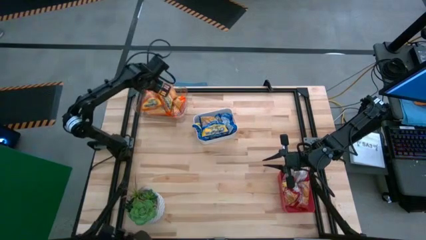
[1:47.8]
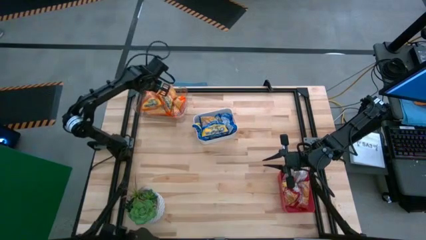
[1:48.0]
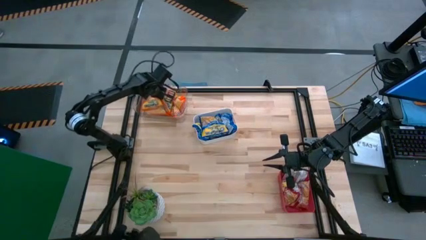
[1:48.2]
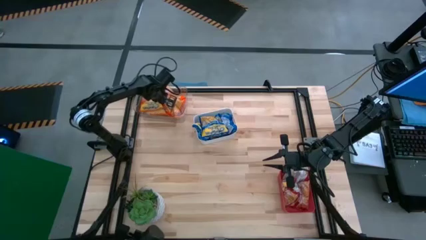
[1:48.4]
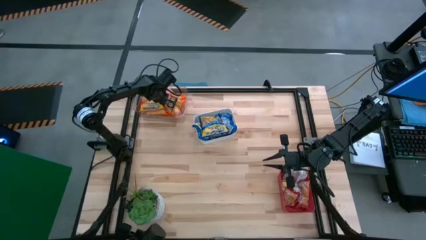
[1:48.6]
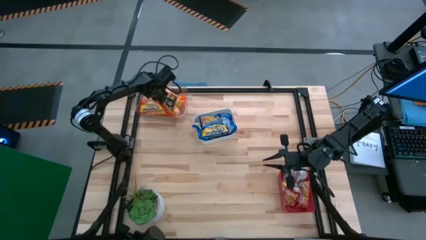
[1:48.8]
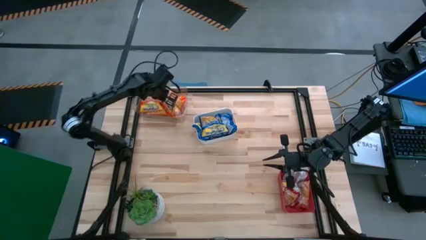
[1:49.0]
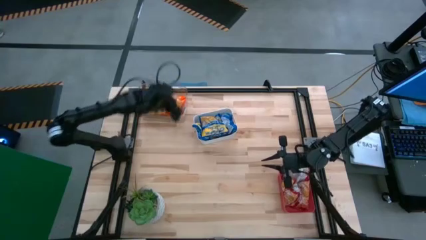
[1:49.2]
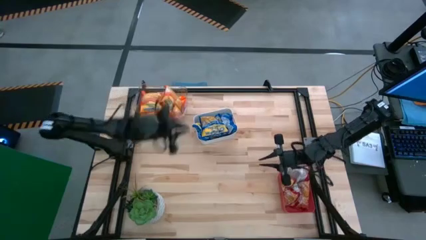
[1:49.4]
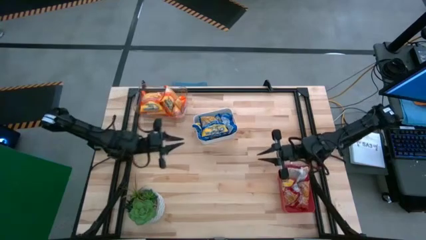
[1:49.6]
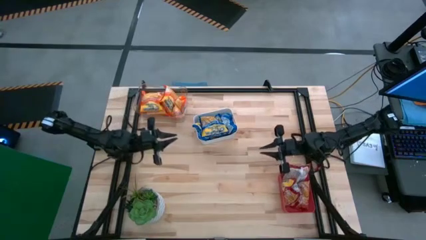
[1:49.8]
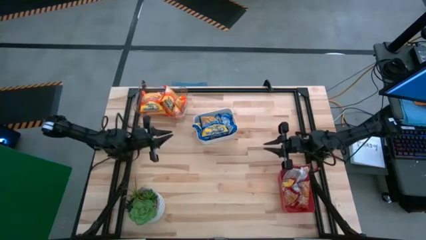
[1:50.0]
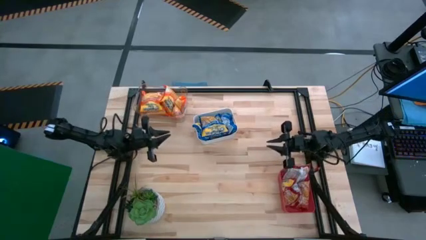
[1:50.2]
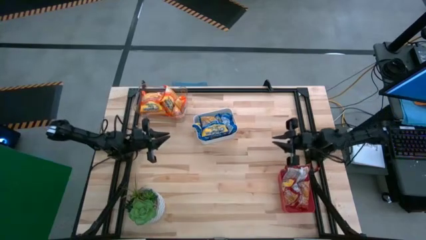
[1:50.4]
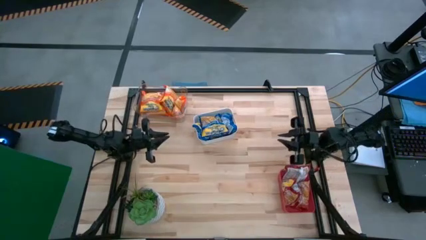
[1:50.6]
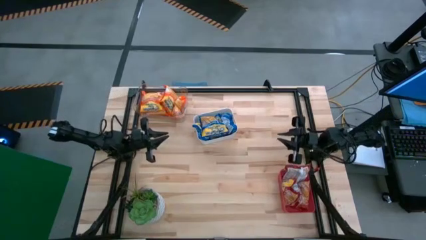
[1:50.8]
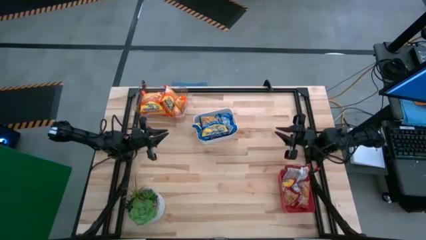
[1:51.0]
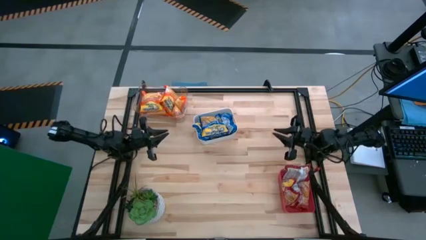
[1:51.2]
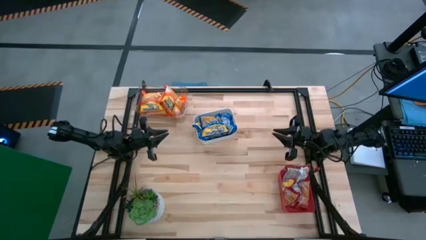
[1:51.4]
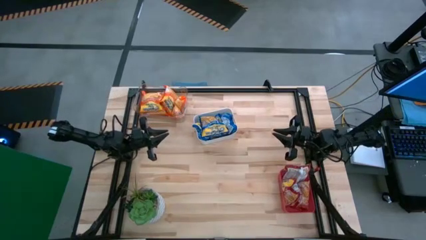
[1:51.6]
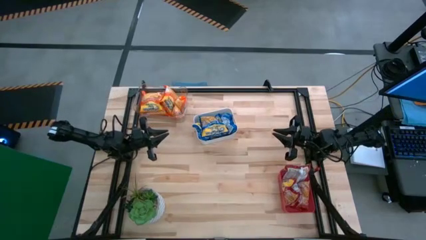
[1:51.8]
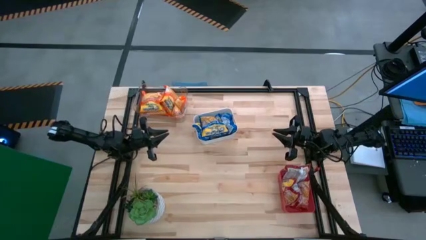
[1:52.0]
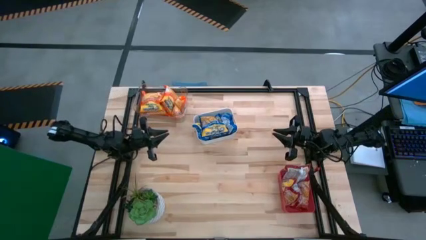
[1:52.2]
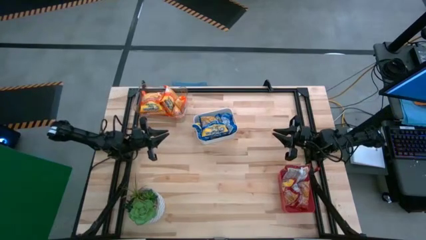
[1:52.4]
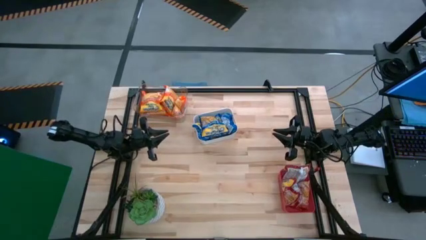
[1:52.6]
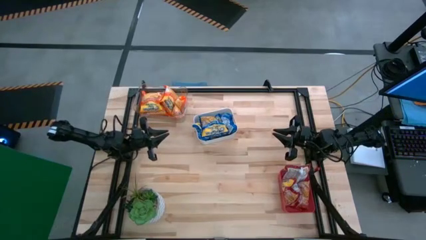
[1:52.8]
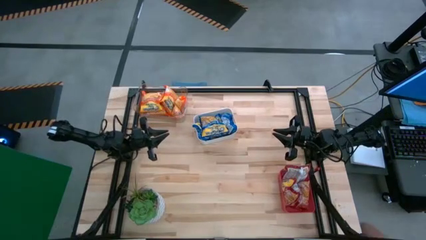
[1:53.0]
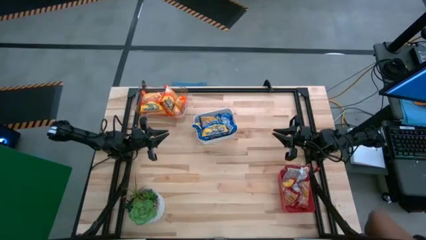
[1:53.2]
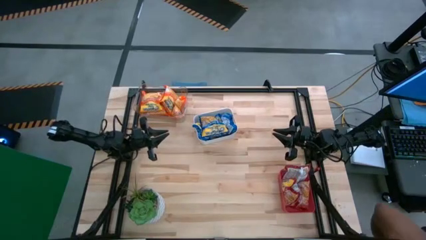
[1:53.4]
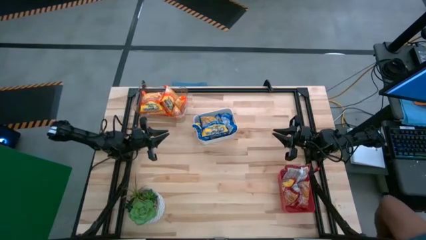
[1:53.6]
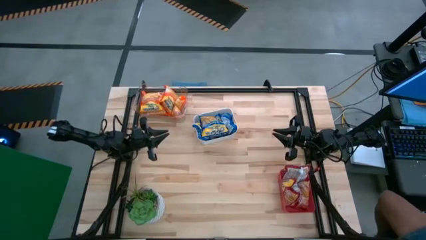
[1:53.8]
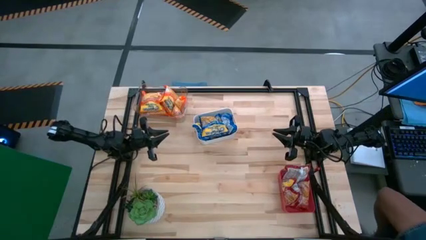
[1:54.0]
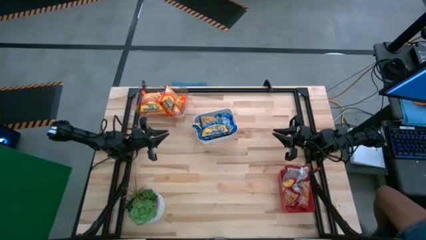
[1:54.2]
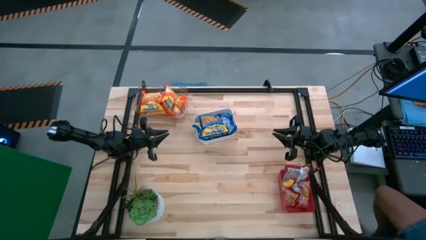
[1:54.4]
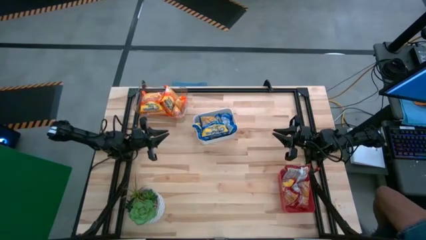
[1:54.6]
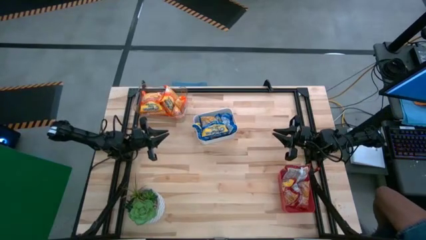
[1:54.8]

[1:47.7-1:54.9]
Task: Sort Maruchan noodles
Return to Home Position

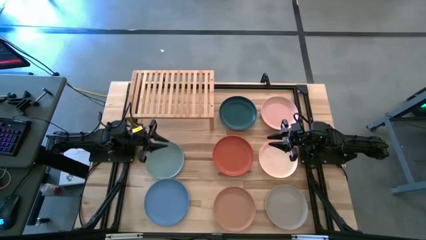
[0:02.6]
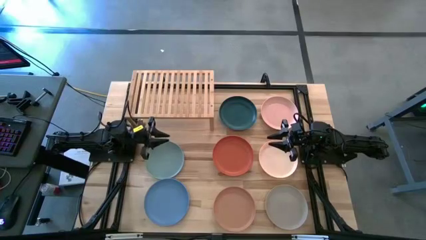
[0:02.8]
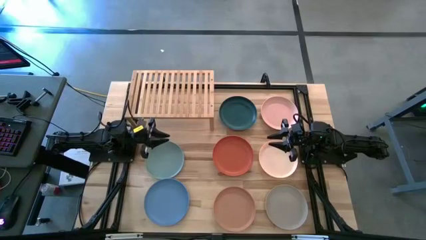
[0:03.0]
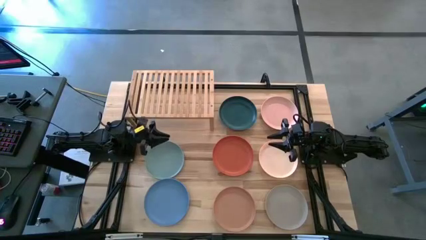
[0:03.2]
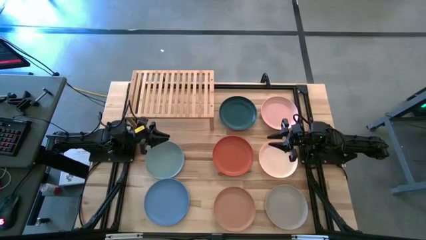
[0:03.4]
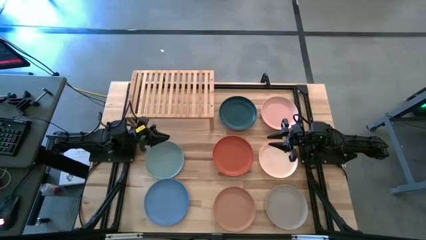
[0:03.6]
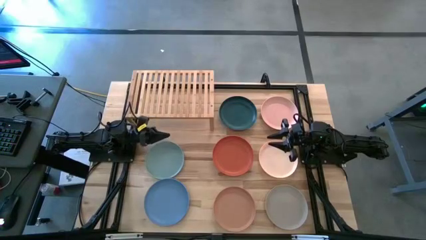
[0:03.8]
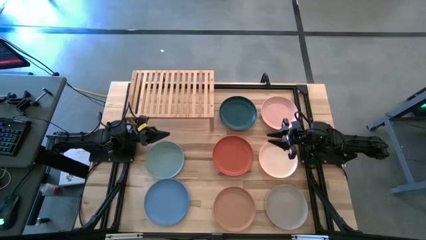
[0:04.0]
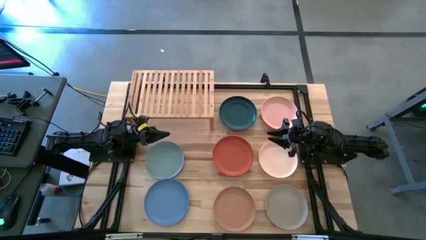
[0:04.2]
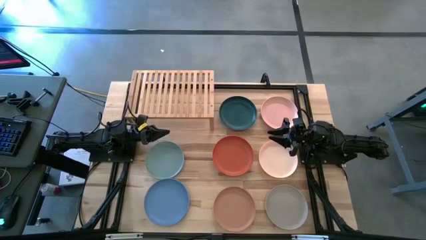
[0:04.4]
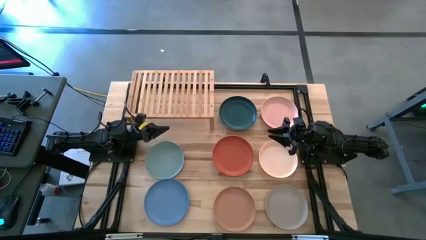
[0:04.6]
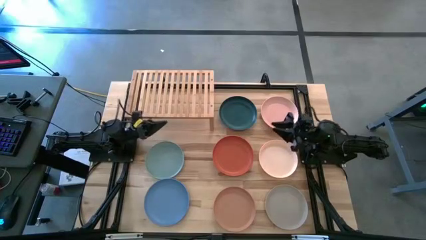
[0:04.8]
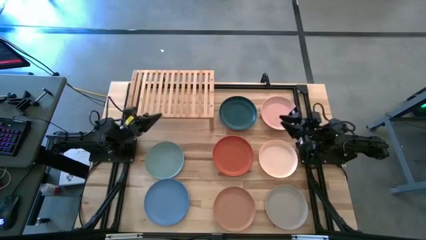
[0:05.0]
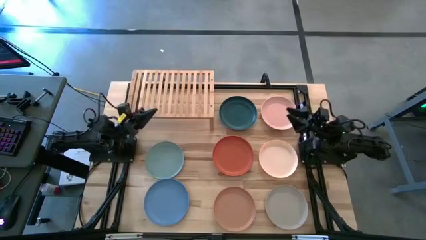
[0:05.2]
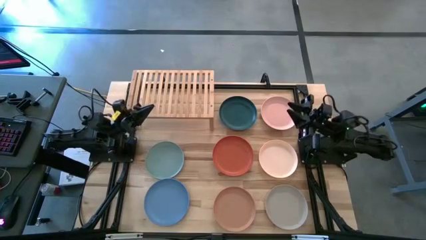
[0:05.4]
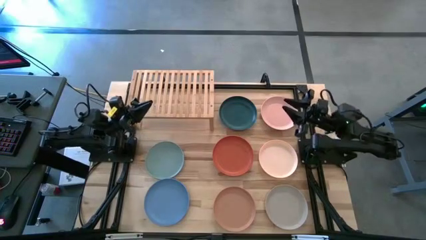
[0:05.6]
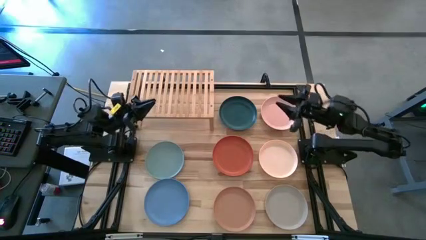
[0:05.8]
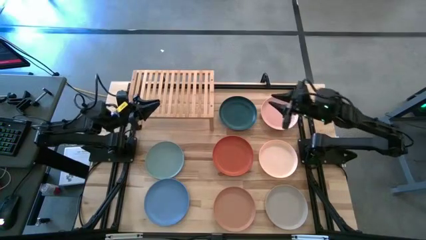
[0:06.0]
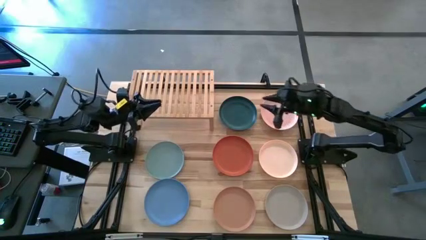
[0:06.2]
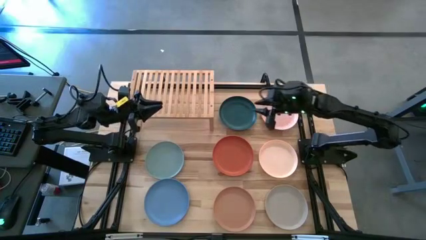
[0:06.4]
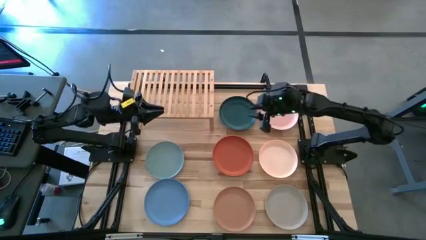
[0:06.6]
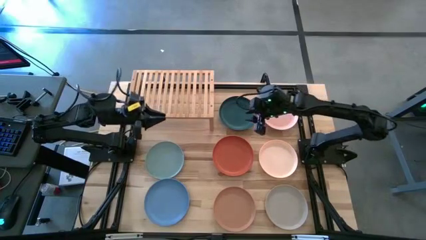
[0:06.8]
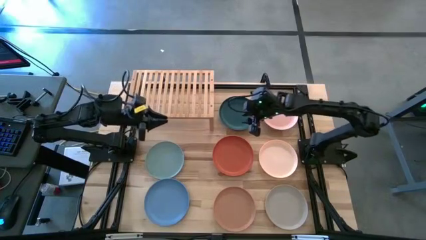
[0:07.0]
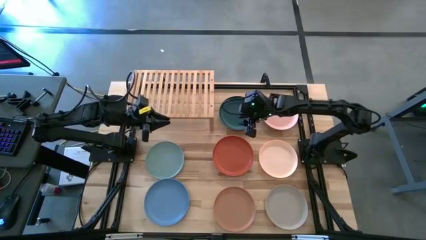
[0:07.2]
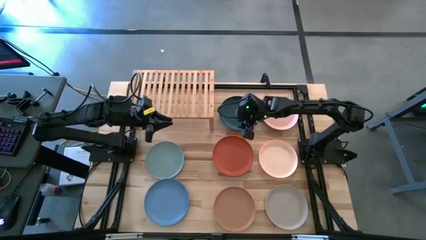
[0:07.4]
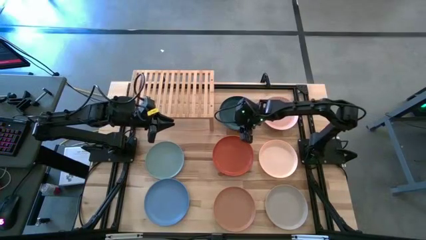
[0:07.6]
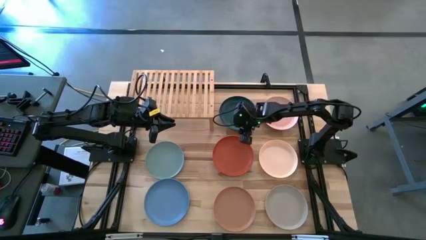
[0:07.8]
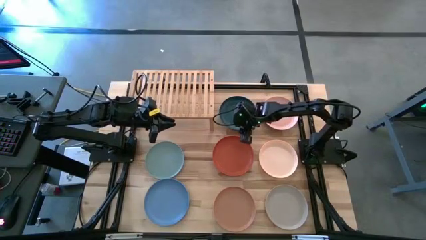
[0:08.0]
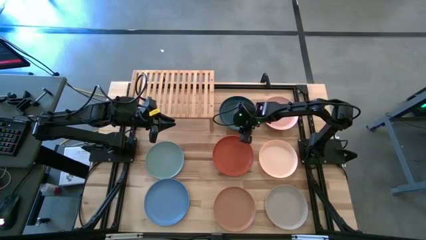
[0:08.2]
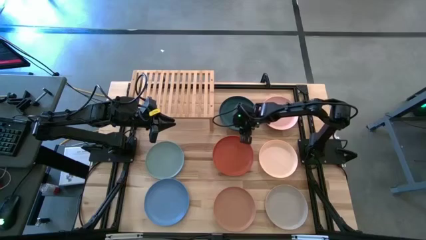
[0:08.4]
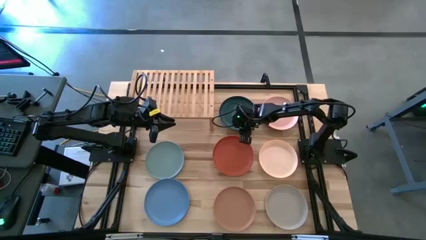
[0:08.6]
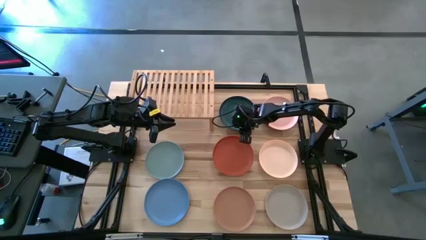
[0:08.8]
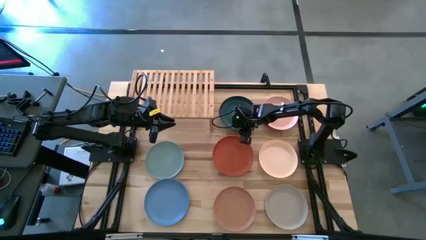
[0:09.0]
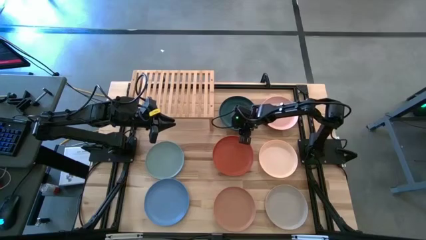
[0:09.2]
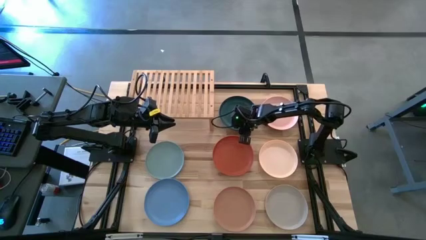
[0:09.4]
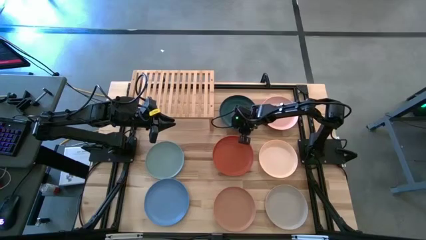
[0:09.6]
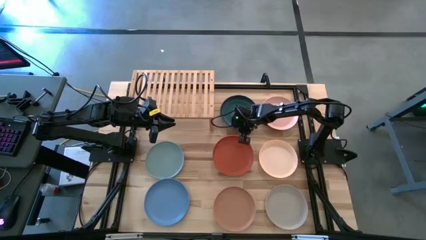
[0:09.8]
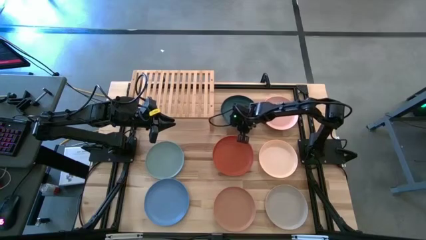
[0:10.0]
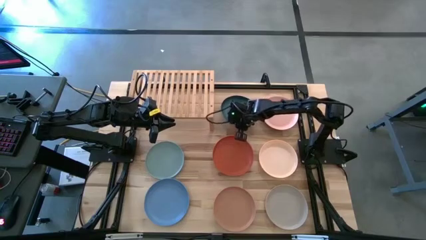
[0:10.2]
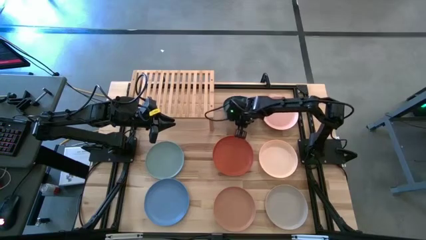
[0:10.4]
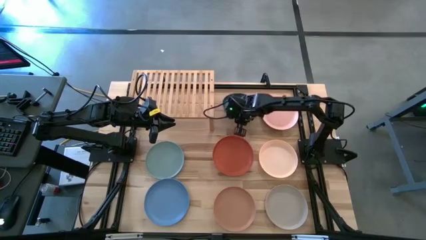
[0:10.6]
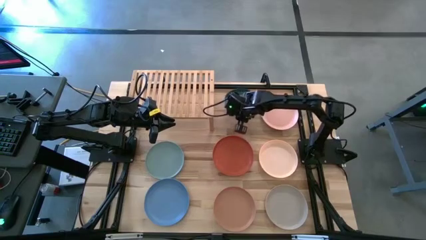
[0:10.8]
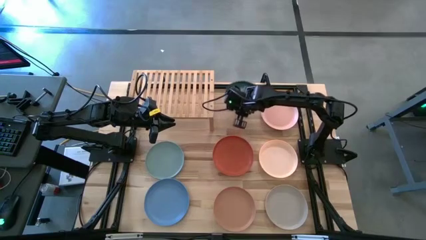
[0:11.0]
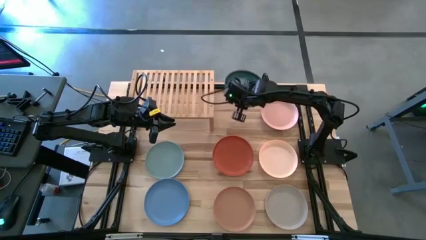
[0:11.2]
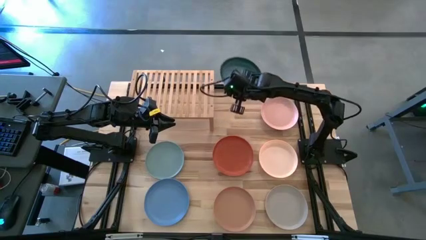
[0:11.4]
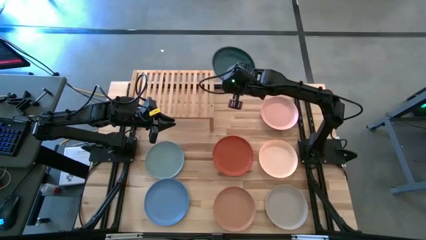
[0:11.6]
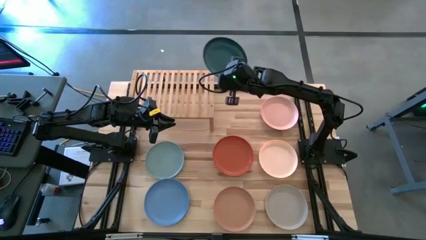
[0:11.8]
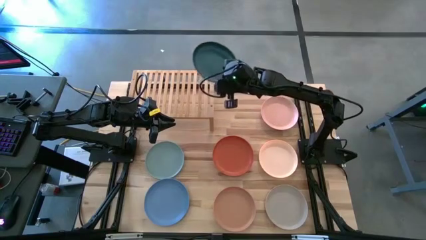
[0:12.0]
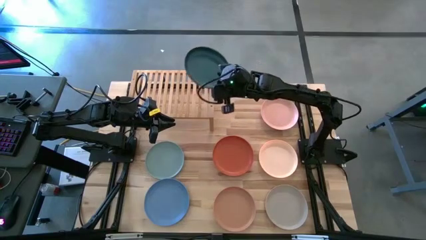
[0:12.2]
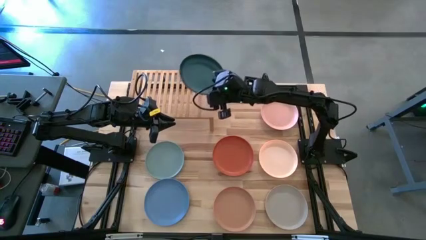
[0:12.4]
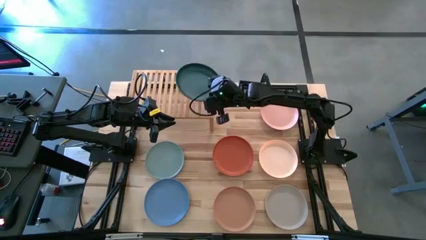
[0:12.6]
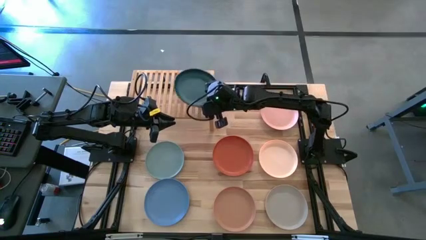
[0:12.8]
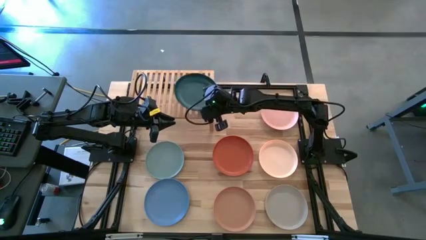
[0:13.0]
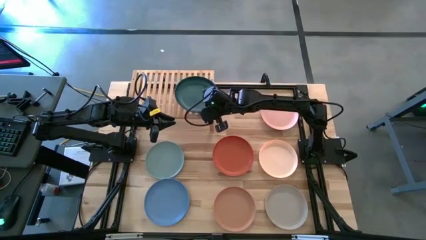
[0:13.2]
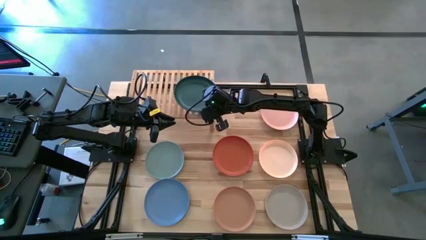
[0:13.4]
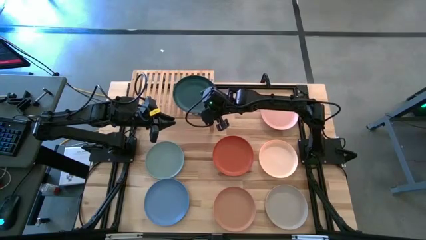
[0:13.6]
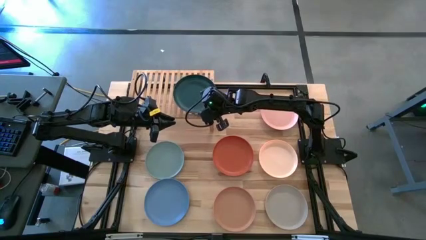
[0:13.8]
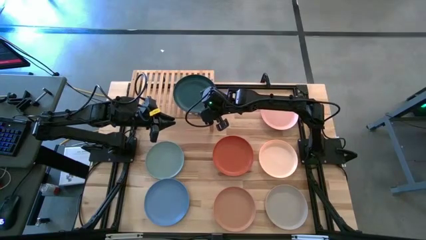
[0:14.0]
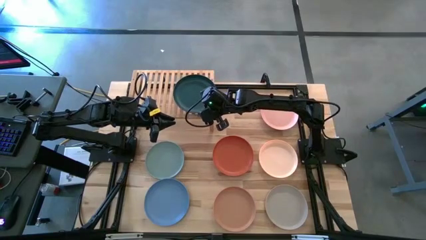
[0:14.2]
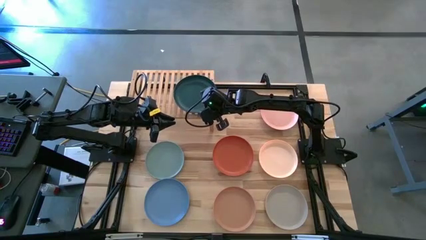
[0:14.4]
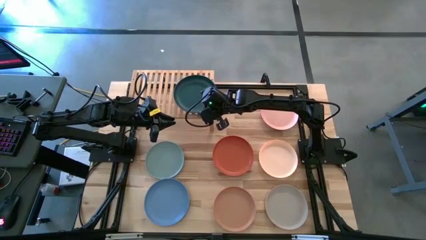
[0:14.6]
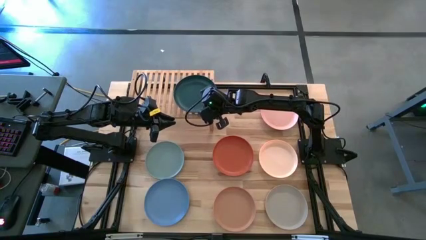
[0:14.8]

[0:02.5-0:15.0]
Task: Place and stack plates onto a shelf
Put the dark green plate on the shelf
